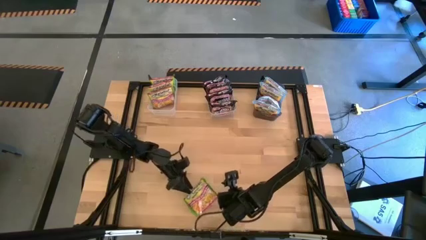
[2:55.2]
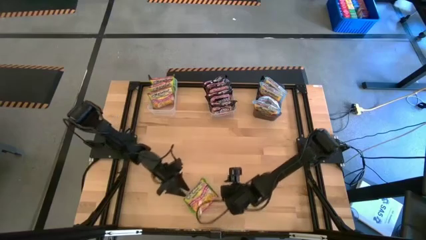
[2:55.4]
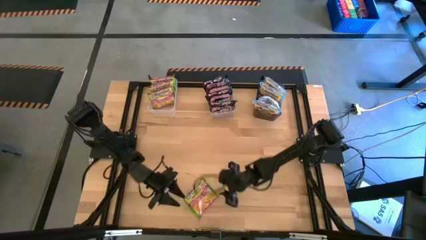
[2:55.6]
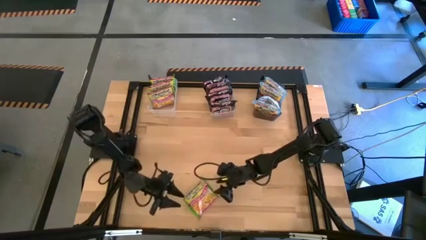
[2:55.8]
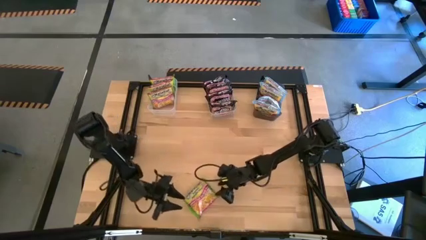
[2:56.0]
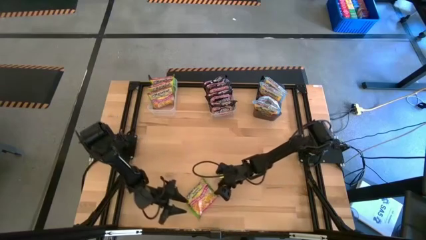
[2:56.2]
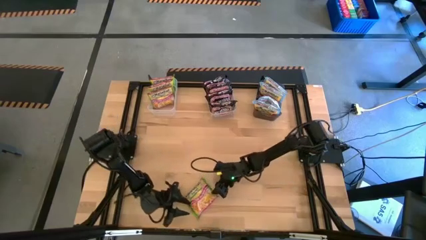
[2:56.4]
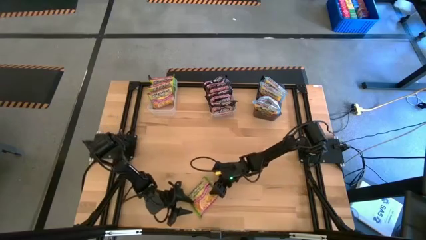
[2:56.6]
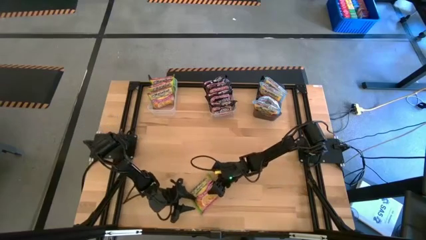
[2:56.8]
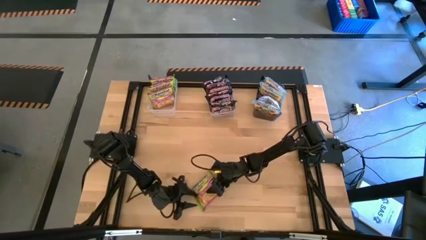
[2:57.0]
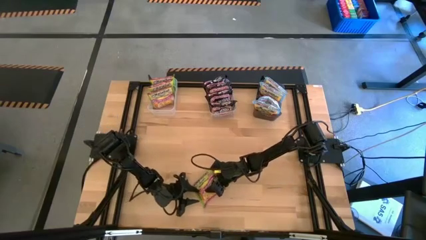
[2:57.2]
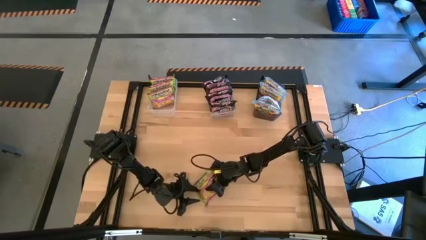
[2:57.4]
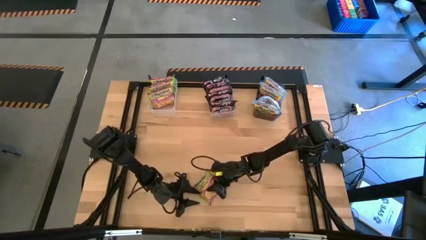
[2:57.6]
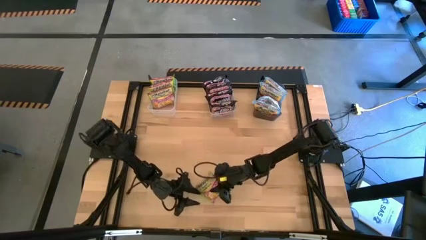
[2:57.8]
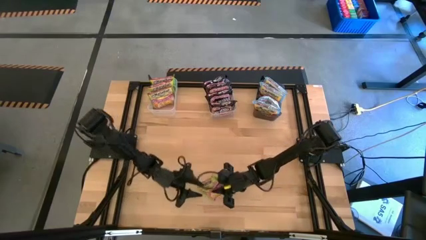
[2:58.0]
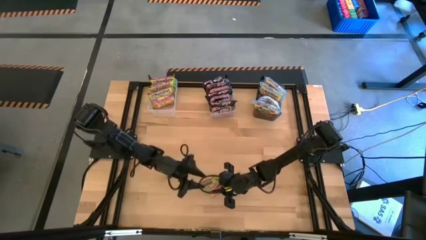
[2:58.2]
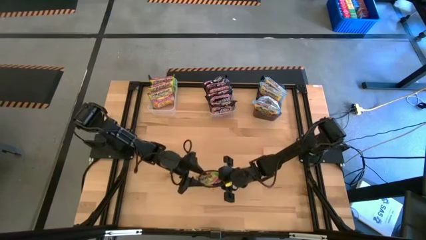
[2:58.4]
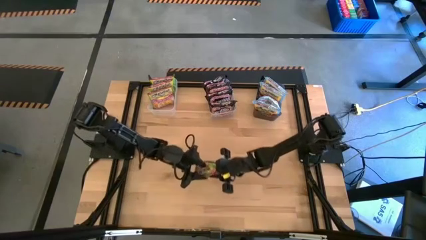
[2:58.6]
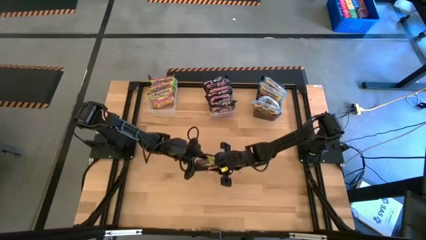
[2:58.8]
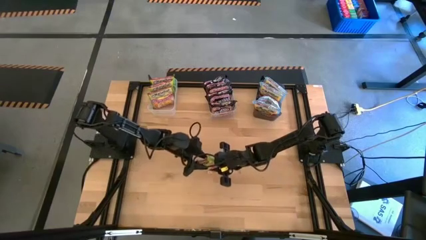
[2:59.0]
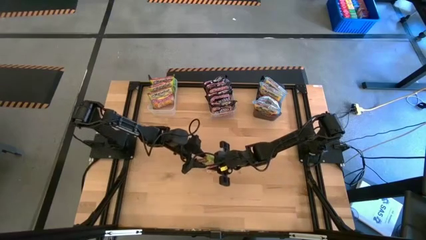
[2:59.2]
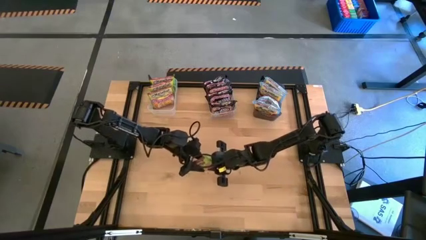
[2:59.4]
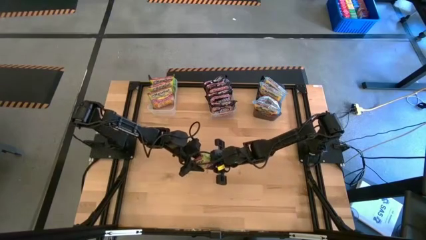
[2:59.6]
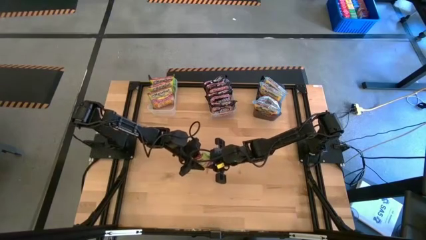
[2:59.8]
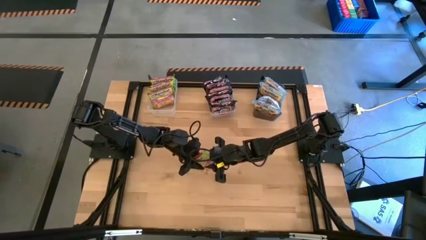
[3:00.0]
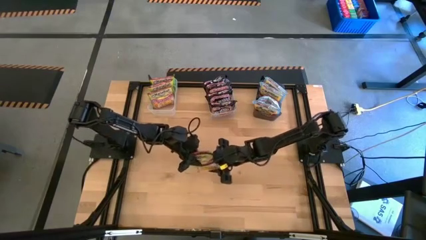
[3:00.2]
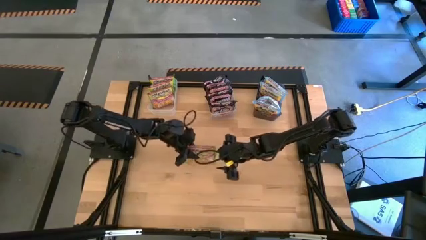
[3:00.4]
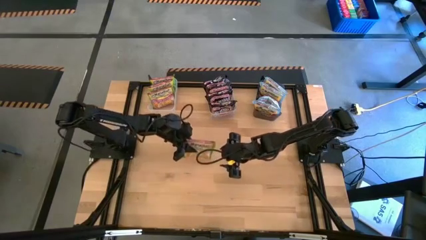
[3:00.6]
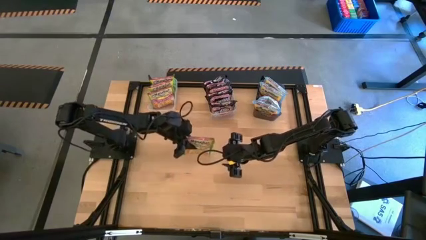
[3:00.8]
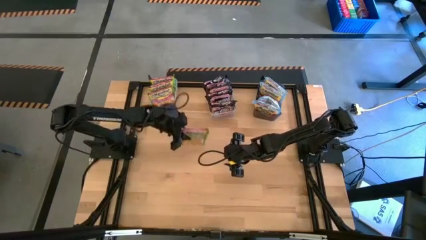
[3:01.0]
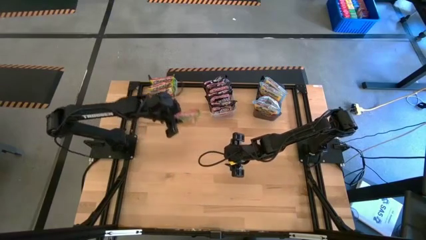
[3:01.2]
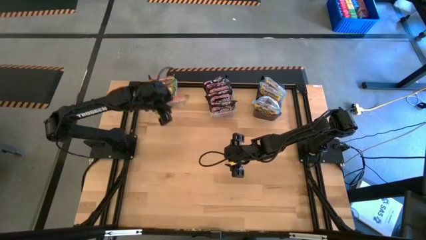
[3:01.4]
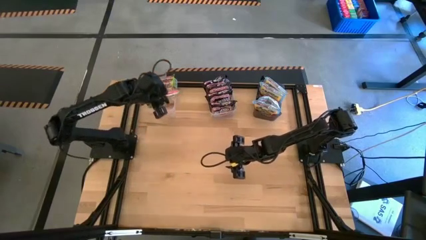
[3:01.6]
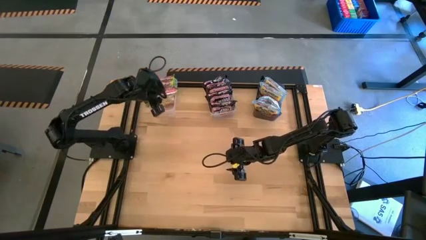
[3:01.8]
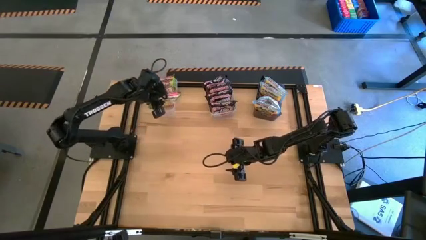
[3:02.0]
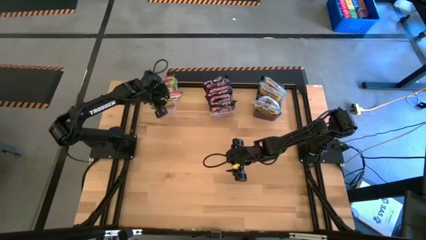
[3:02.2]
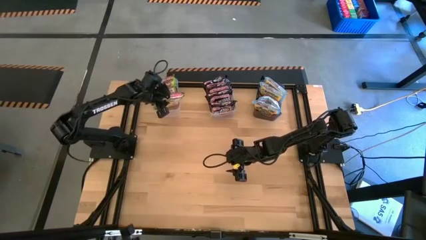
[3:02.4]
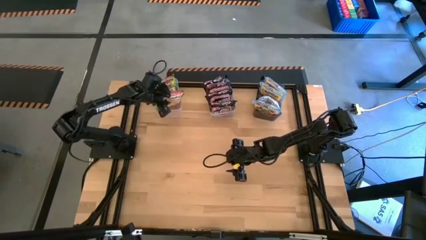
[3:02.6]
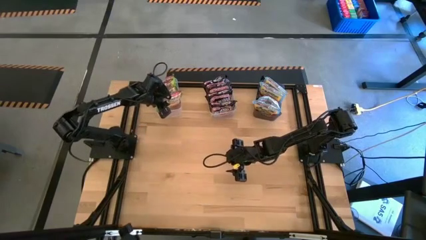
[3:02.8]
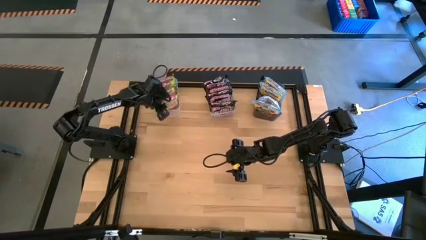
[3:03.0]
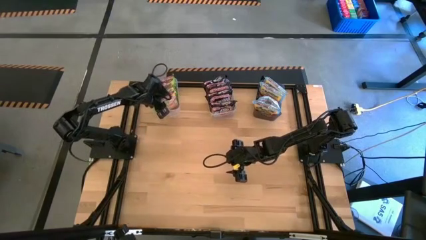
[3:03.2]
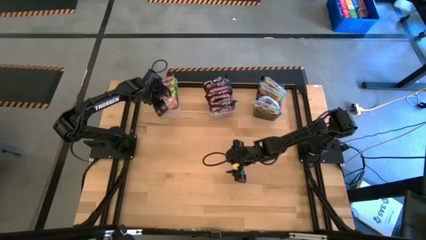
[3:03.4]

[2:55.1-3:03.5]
Task: Sort Maruchan noodles
Put the green noodle pack into the left transparent bin

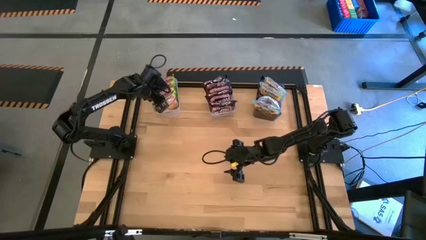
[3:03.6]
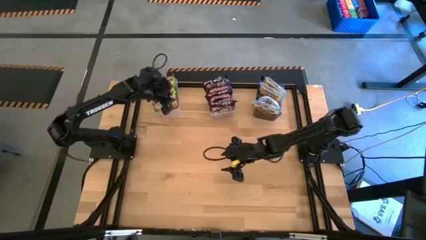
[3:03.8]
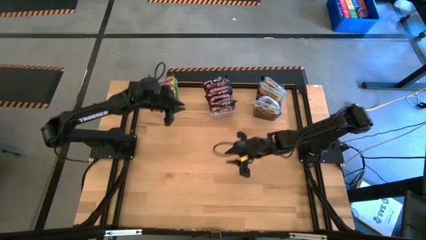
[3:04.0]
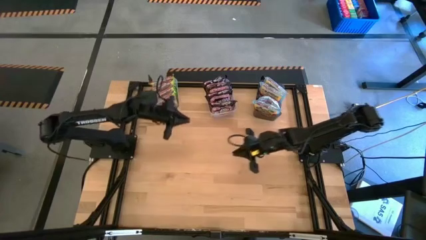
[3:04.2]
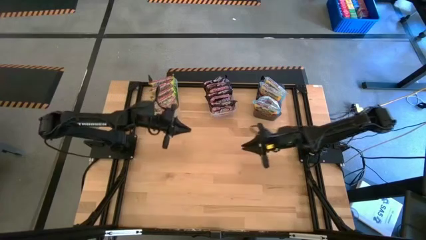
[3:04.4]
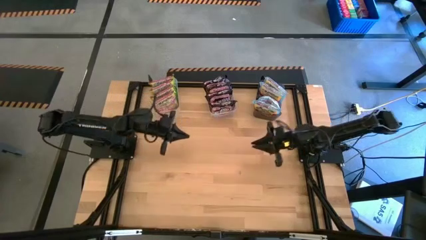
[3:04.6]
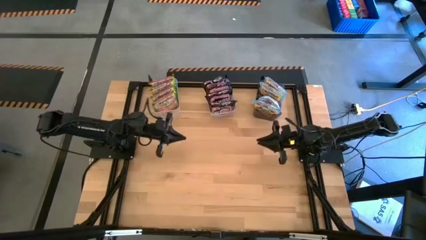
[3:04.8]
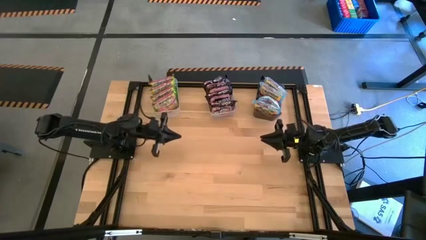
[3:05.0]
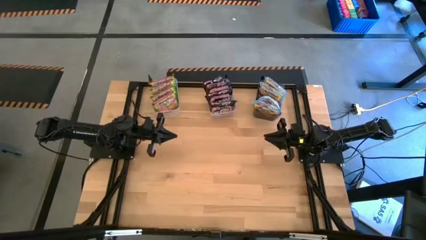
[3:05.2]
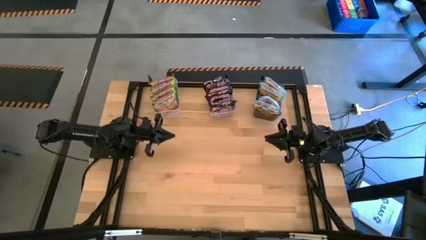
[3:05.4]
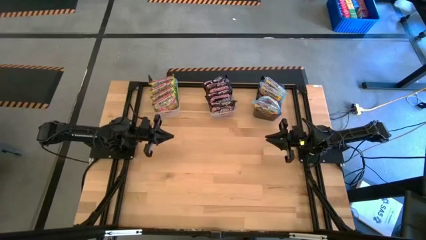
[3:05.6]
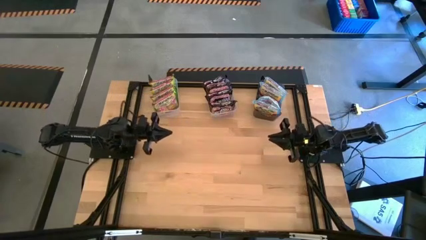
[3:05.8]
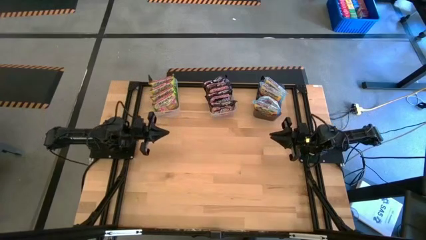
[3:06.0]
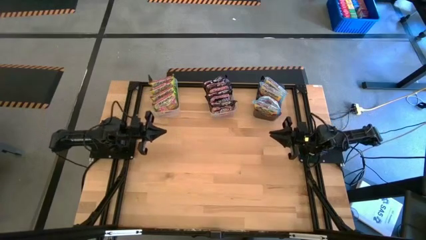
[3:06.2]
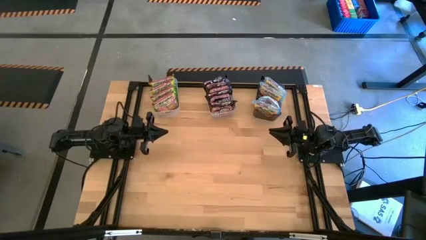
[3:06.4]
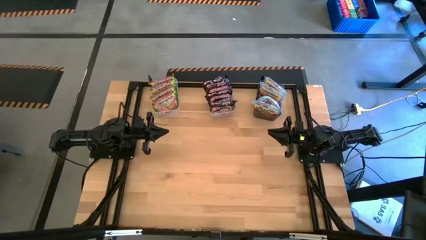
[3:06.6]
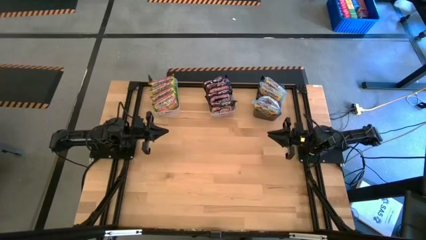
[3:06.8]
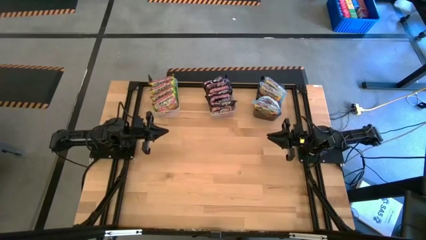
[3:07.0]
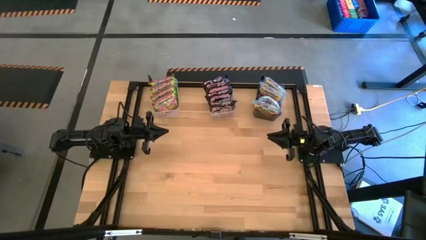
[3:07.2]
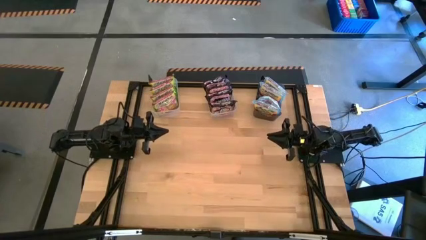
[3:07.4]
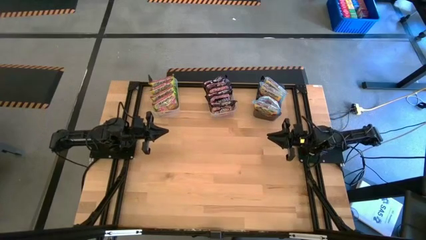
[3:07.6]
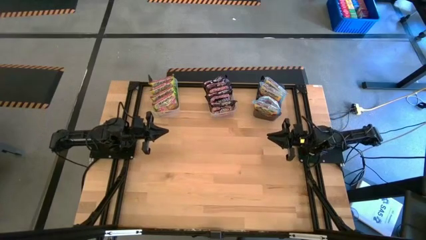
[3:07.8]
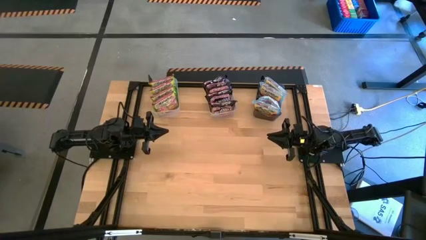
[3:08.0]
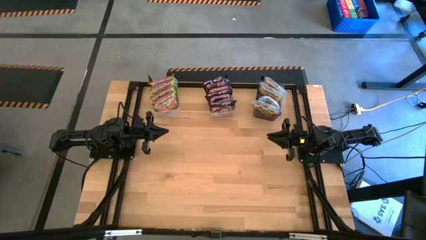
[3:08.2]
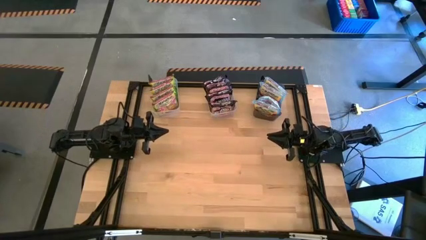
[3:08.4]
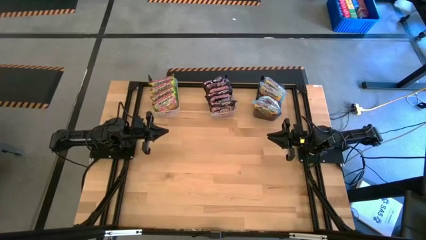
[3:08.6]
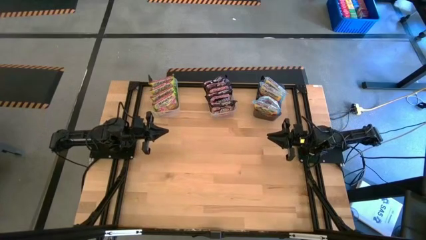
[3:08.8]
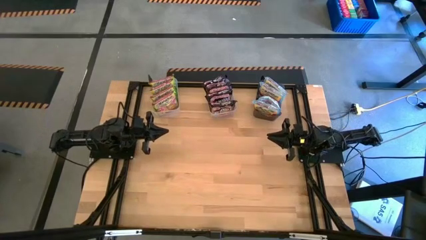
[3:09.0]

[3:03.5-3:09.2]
Return to Home Position

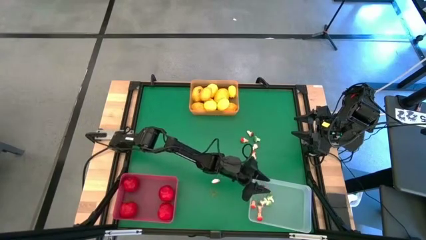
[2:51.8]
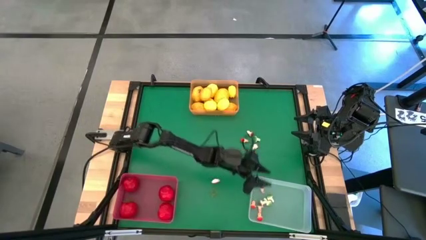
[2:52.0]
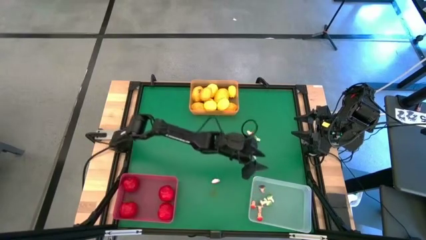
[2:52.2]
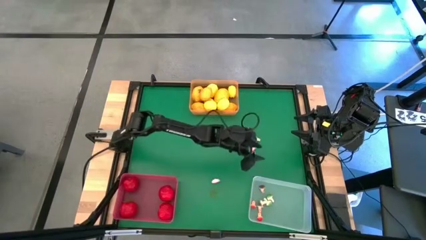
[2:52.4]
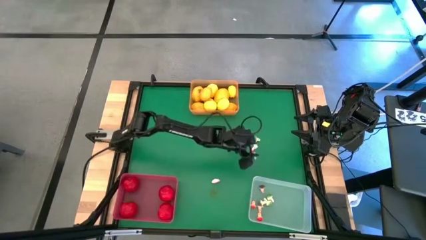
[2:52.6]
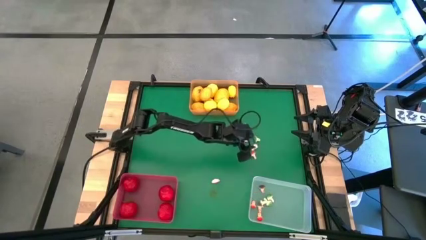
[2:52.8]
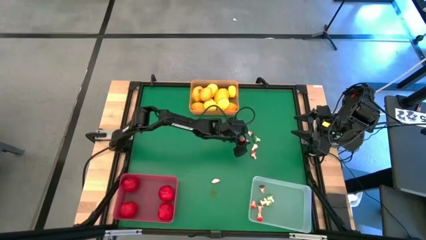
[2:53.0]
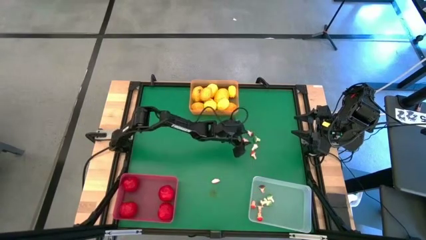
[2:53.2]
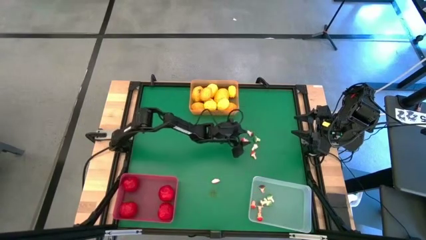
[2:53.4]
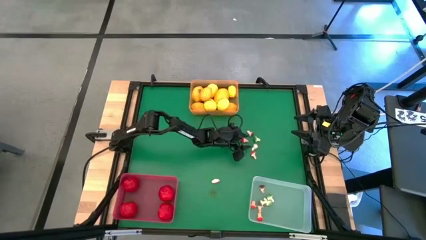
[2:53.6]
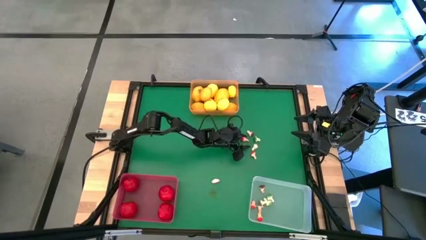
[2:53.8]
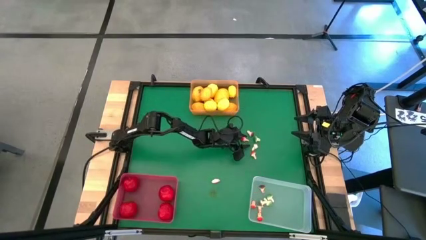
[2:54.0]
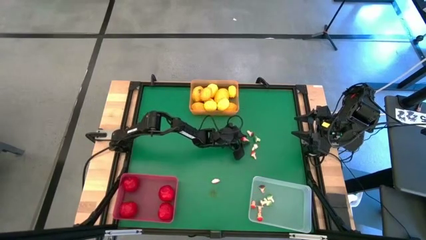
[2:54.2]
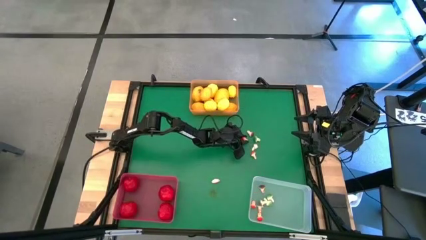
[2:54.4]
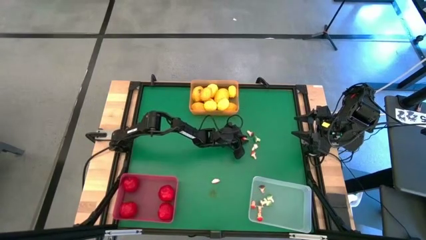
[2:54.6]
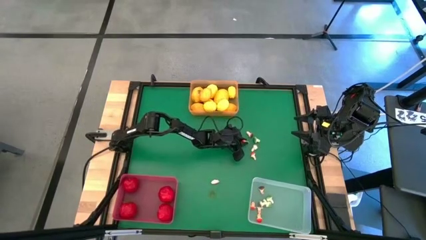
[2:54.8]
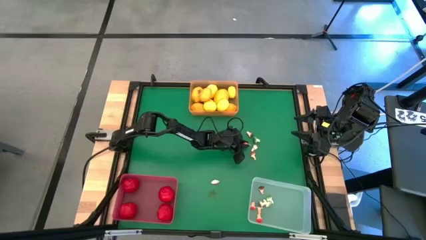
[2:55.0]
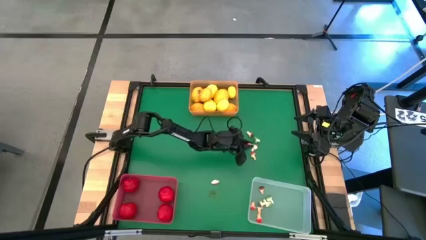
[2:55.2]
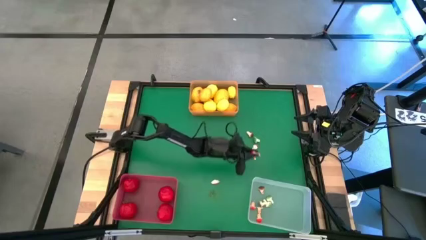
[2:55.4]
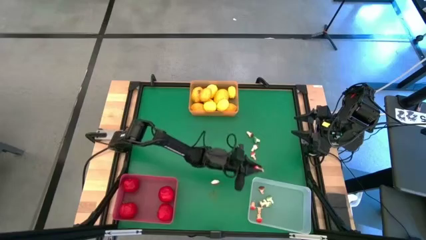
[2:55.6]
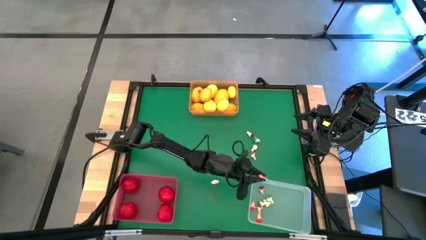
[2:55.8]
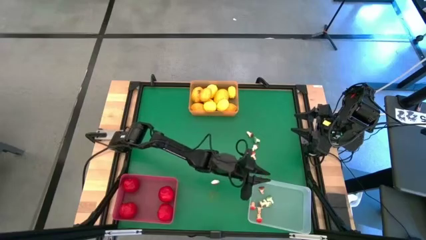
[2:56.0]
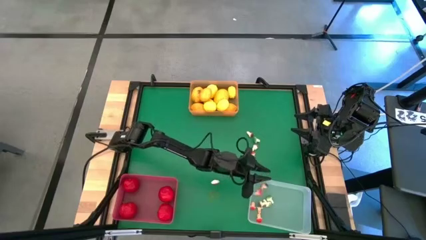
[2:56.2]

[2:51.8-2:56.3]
Task: Sort produce into baskets
Put the red mushroom into the transparent bin
